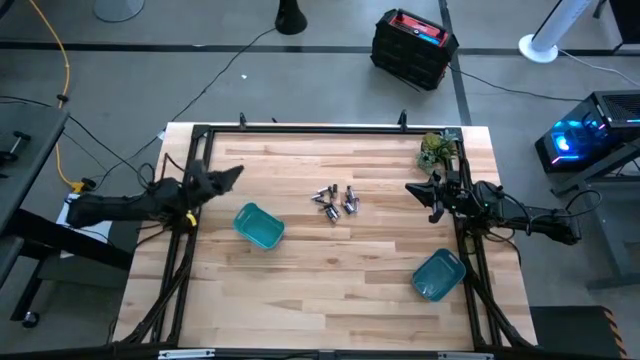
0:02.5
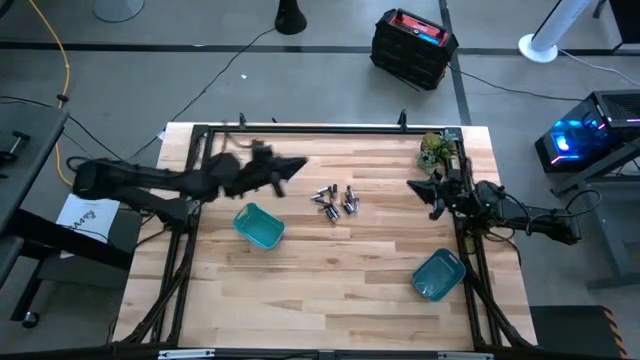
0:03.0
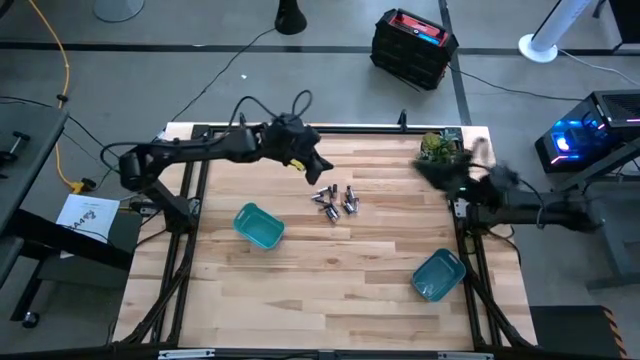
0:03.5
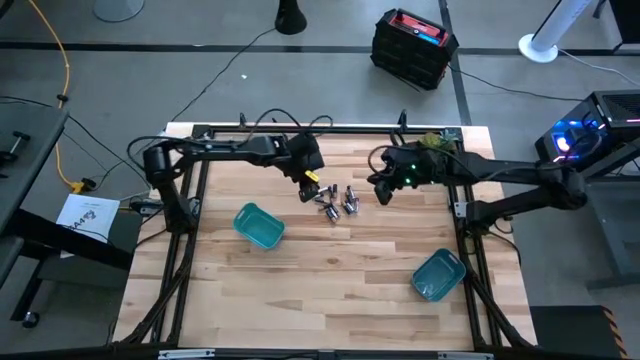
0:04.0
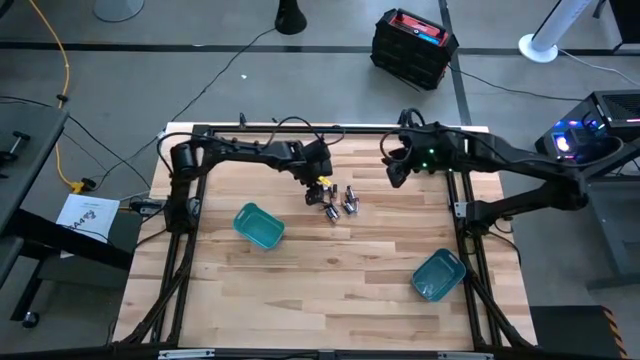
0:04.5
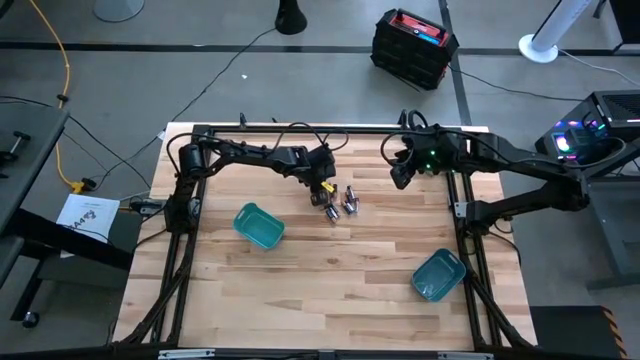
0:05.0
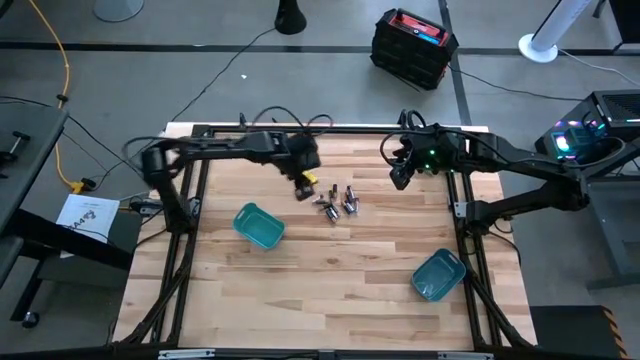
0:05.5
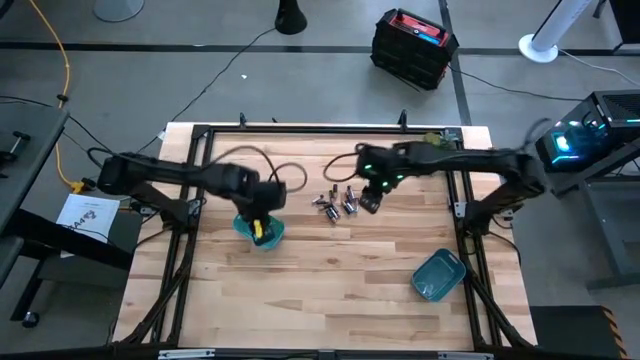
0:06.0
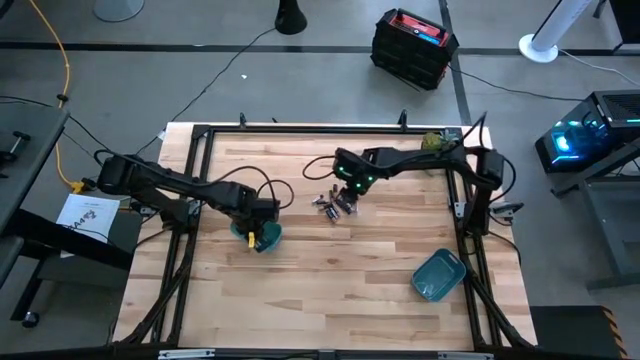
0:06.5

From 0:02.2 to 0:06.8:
Task: Sort batteries
Put the silver battery into the green bin

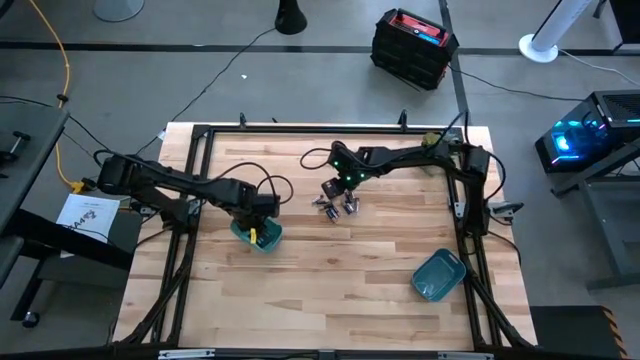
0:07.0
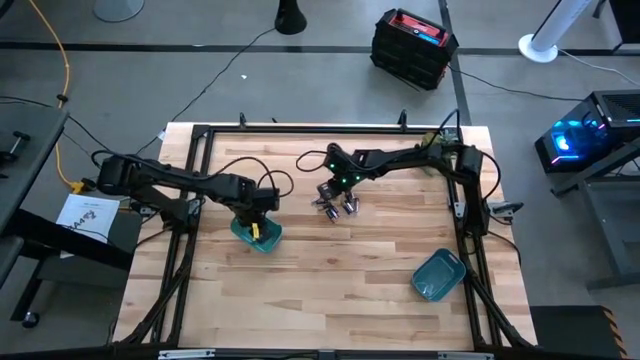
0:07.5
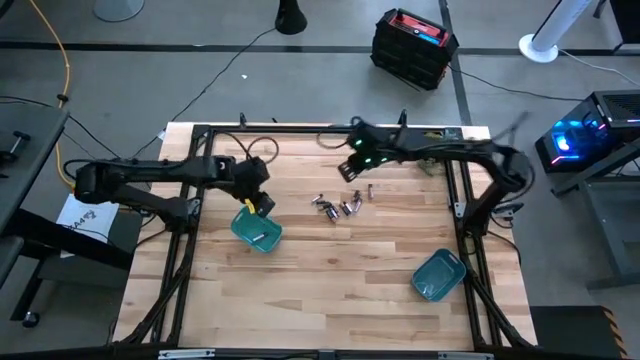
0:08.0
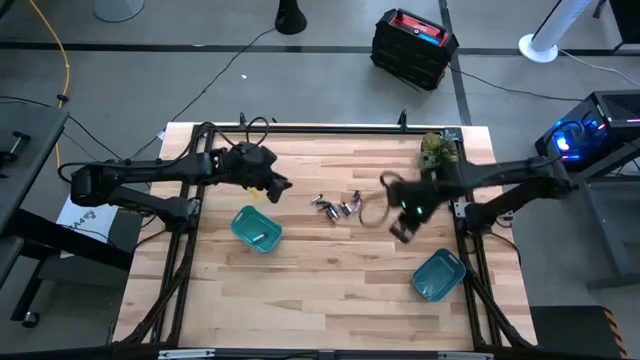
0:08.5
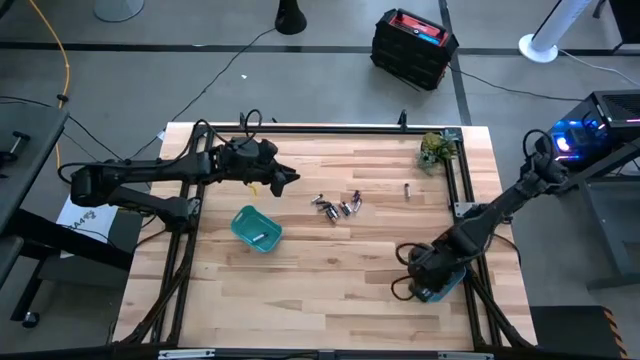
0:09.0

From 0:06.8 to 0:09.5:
Put the black battery into the blue bin

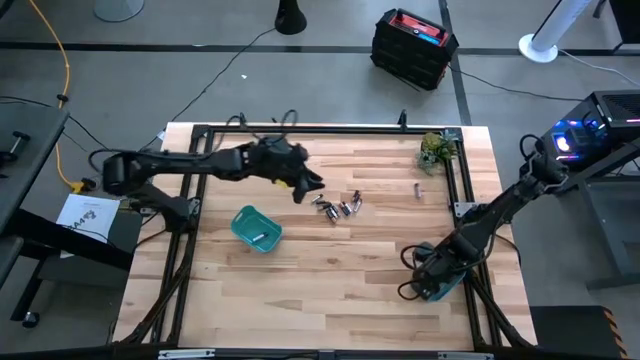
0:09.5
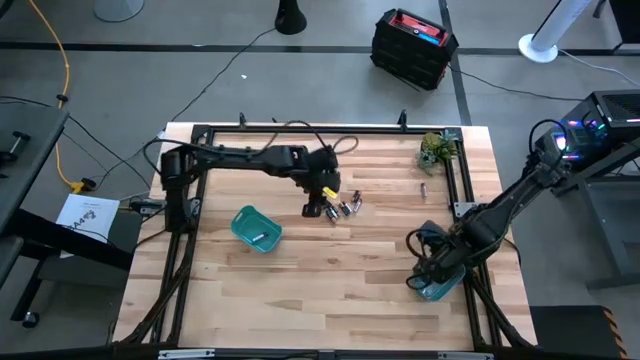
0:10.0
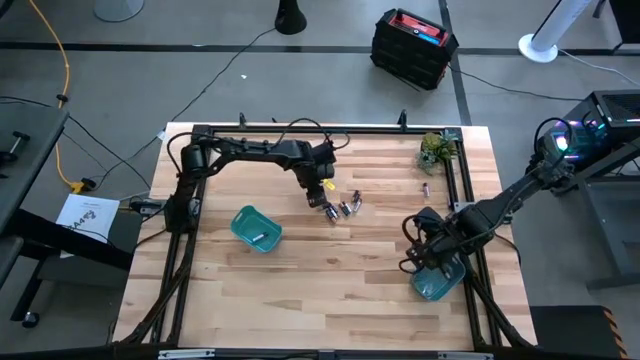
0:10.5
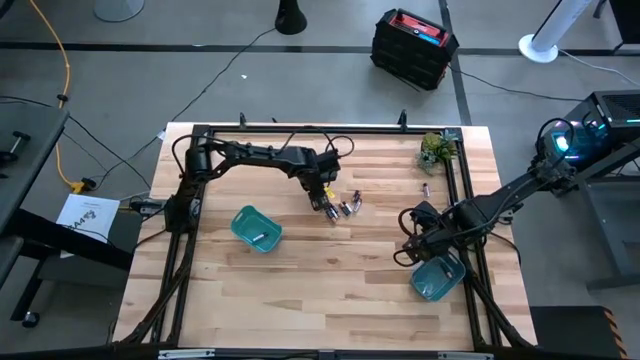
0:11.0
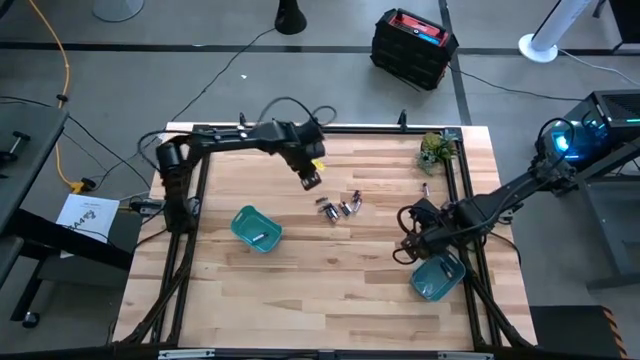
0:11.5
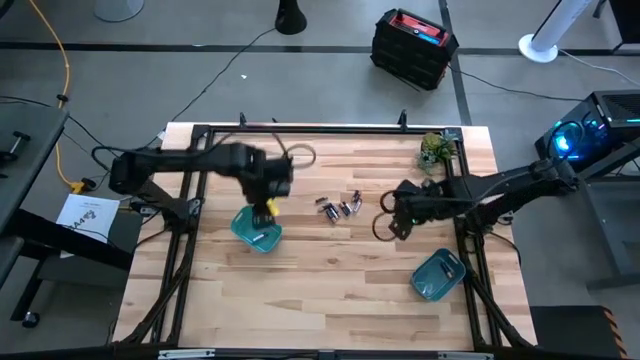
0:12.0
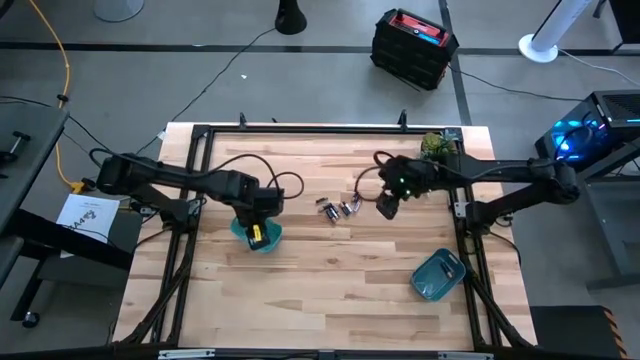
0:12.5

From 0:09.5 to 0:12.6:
Put the silver battery into the green bin

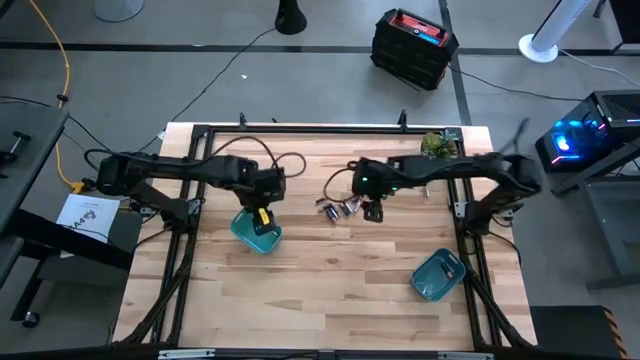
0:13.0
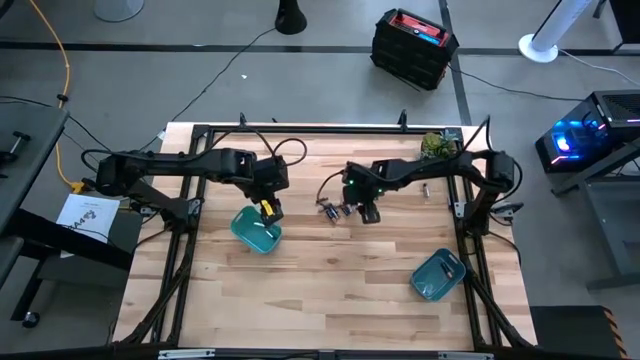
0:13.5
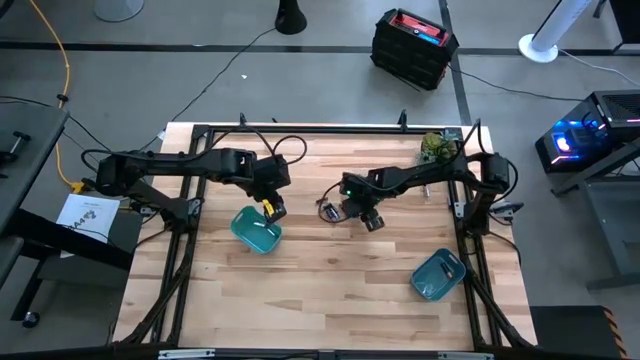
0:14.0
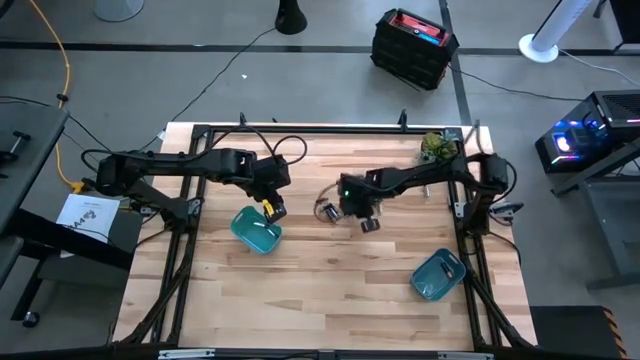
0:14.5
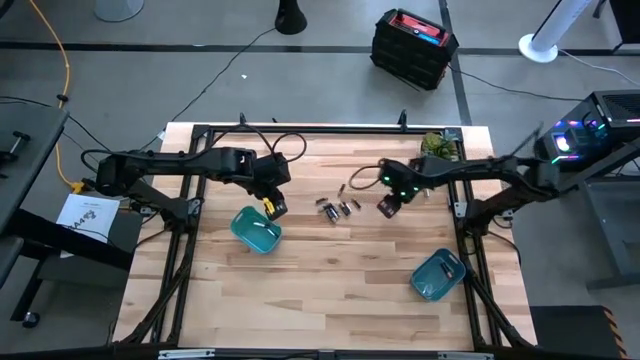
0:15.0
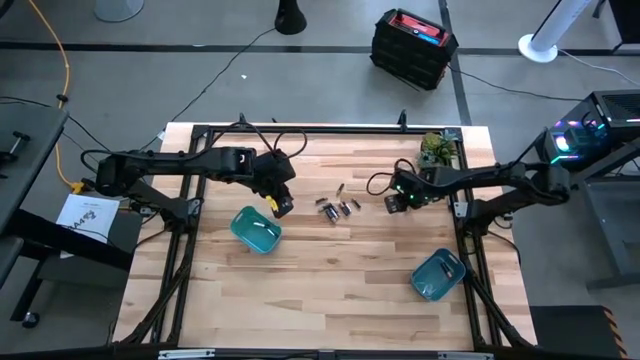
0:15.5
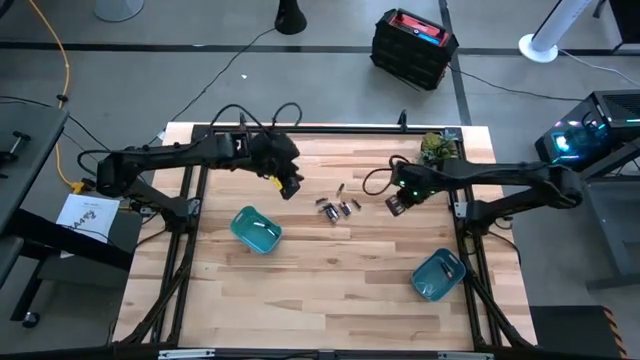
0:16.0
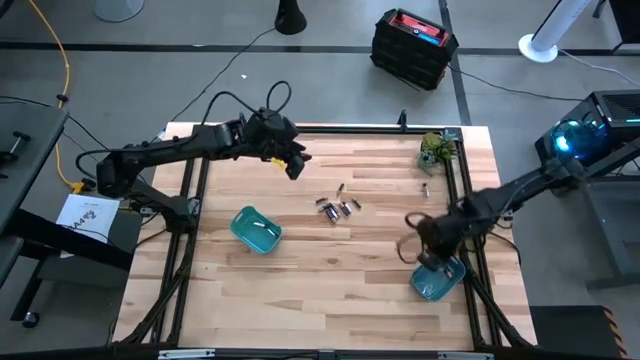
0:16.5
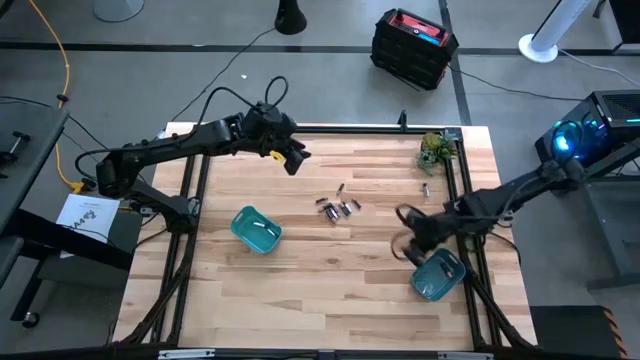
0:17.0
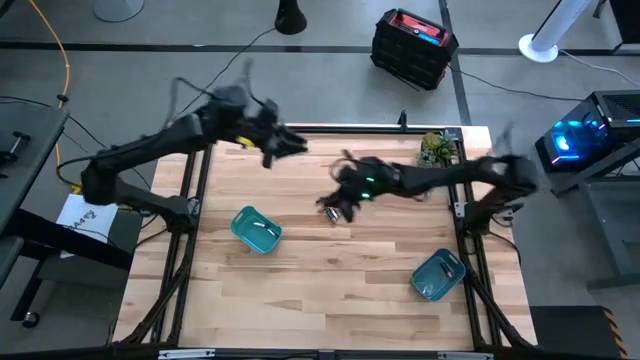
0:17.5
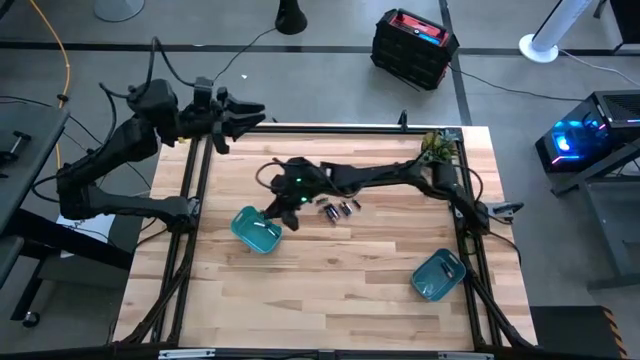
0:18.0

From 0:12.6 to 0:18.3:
Put the silver battery into the green bin

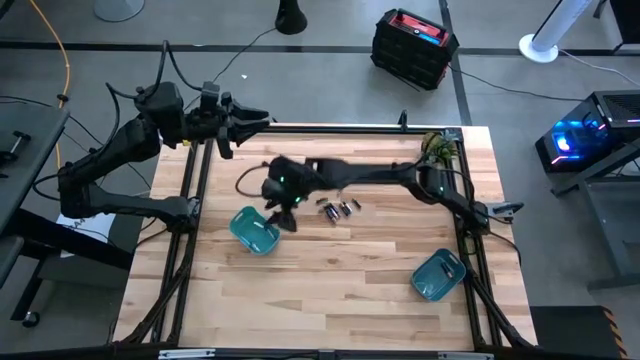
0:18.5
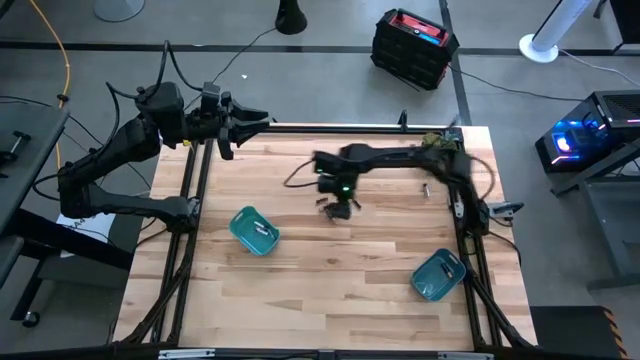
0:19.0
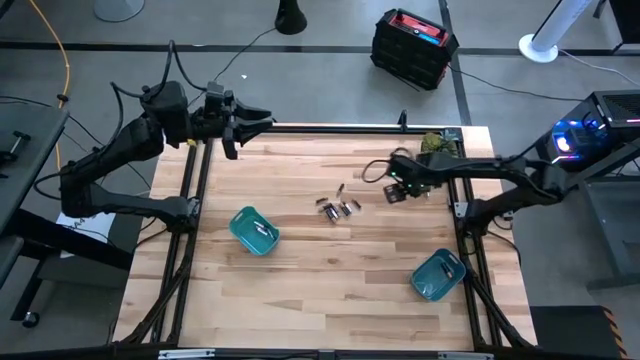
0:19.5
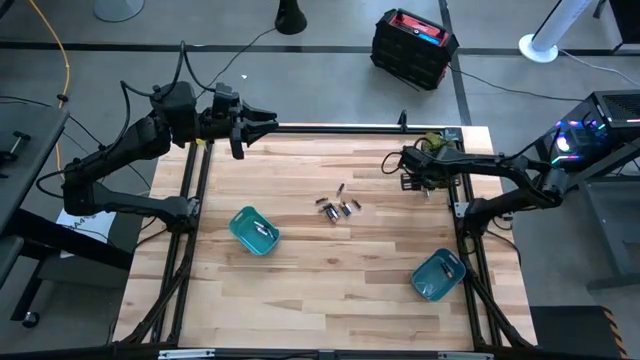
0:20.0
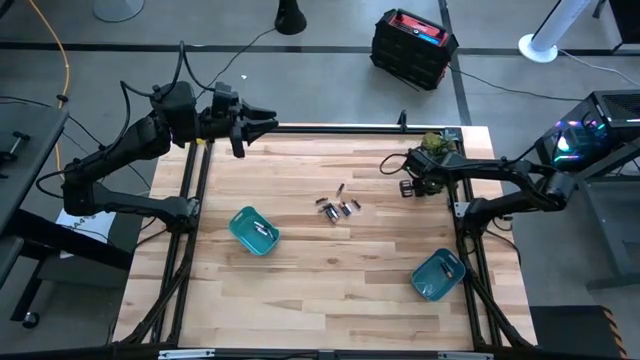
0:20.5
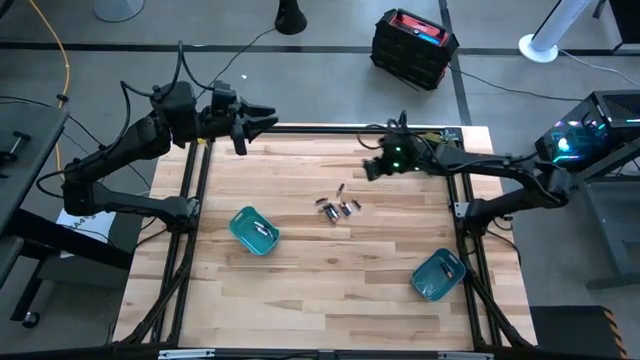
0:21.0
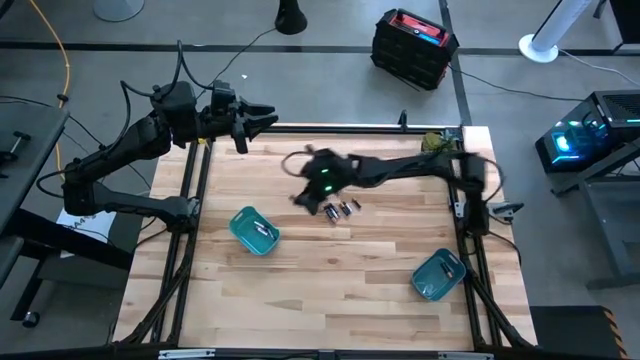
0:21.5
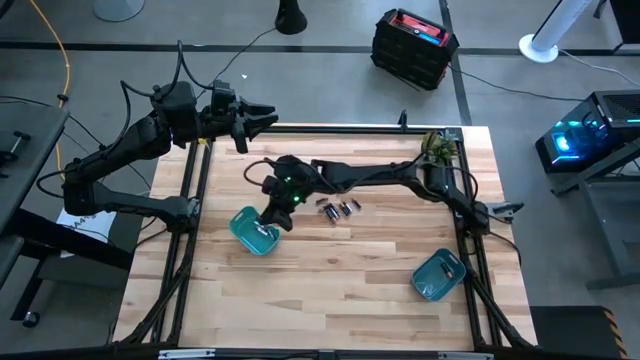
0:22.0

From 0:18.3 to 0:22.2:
Put the silver battery into the green bin
